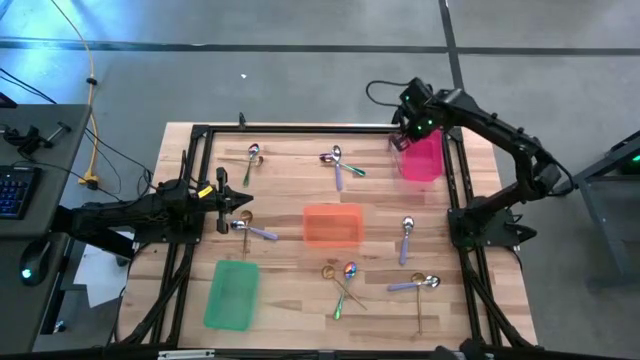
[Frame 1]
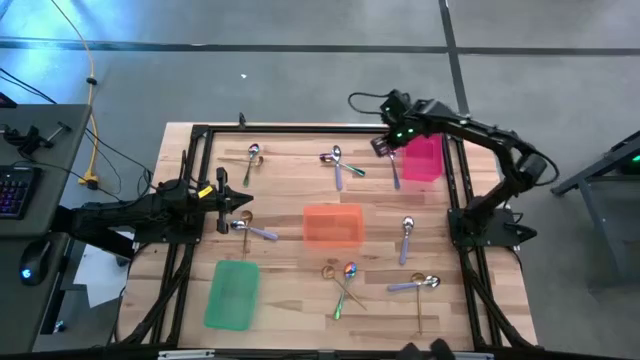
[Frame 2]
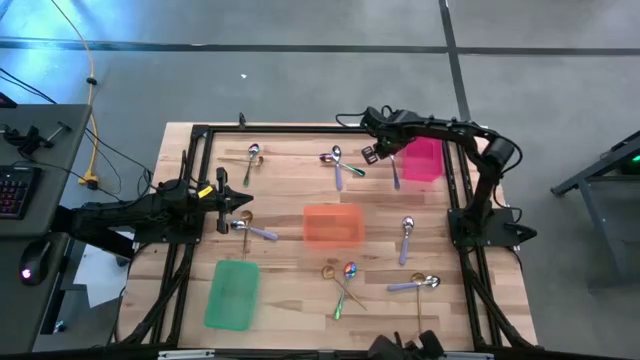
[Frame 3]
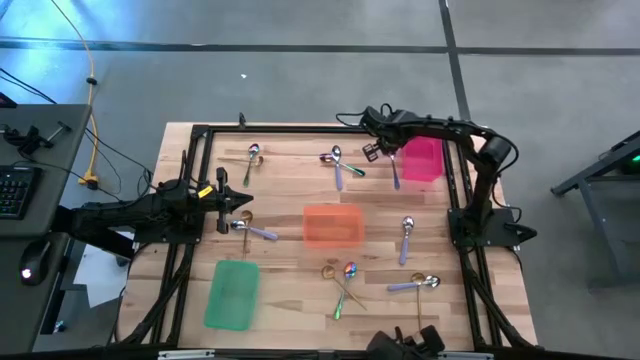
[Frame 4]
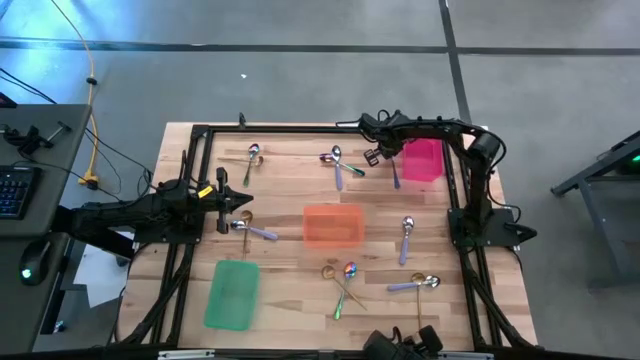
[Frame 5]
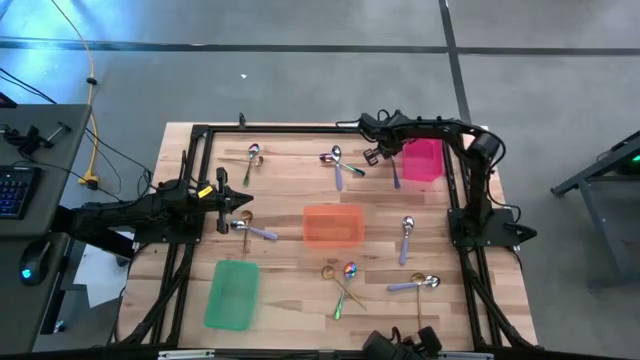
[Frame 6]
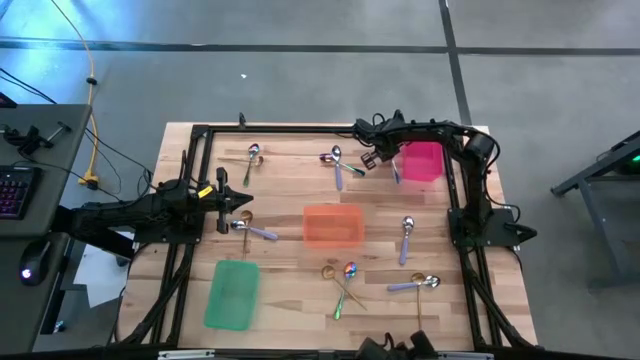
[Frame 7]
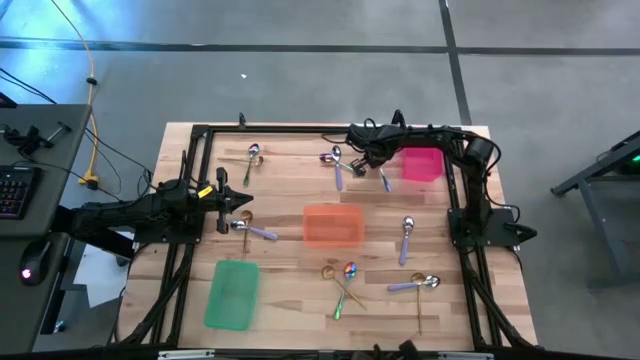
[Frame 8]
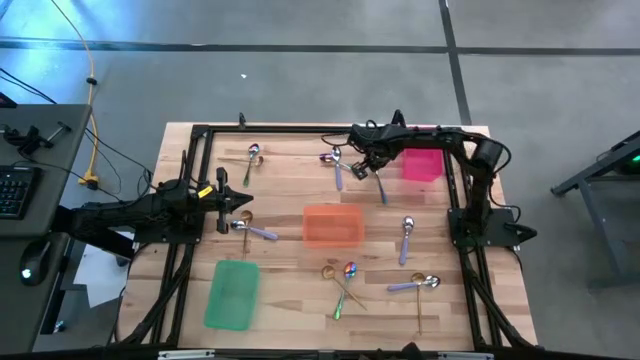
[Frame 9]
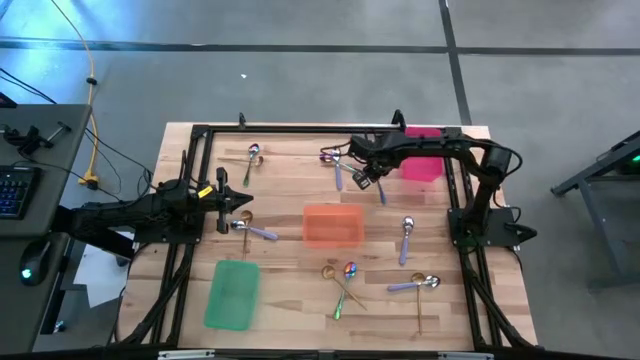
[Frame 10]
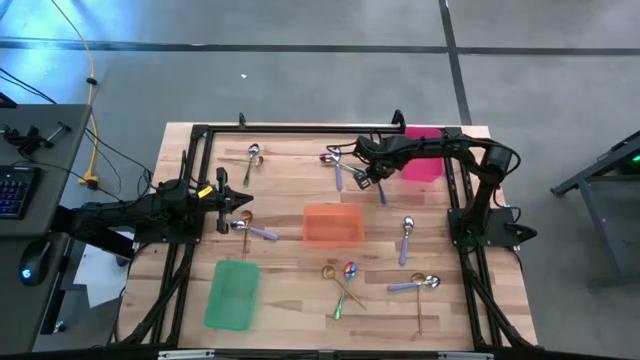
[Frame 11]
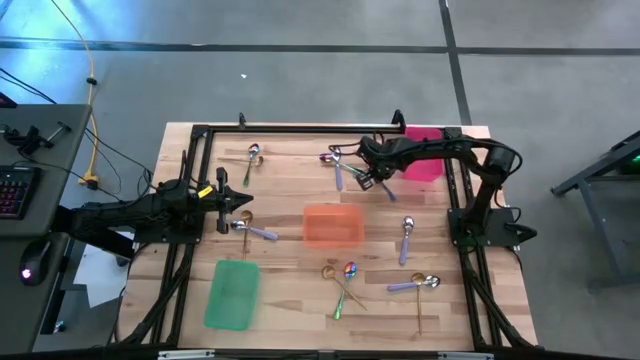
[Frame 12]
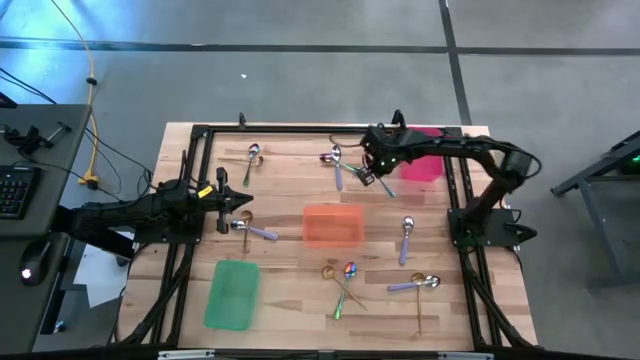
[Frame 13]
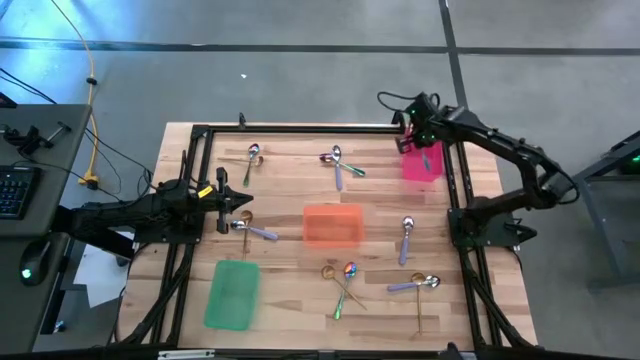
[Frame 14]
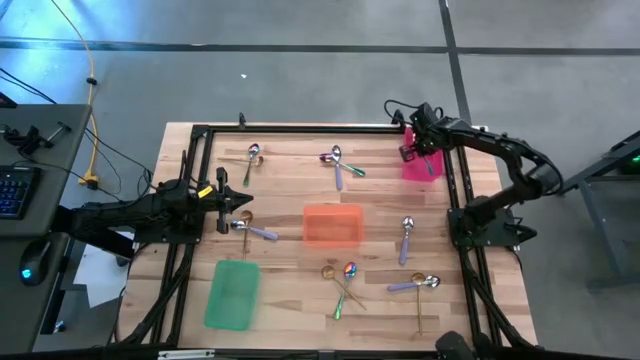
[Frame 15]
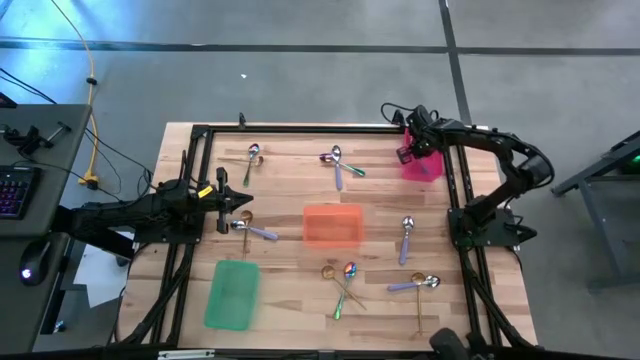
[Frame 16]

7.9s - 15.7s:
Task: Sort silverware by color (type)
Put the right multicolored spoon into the red bin

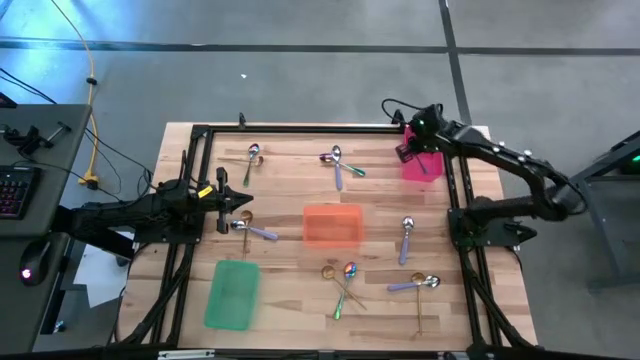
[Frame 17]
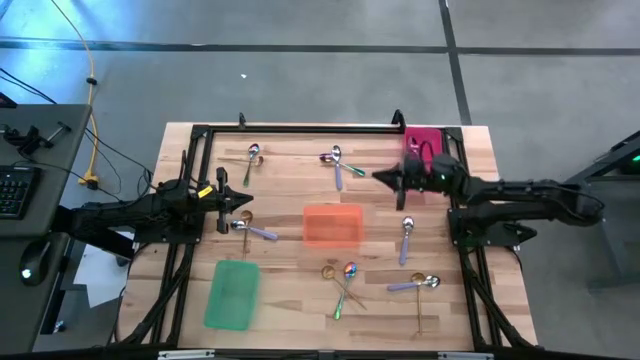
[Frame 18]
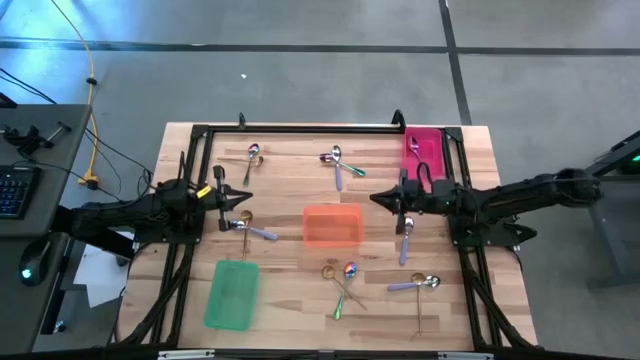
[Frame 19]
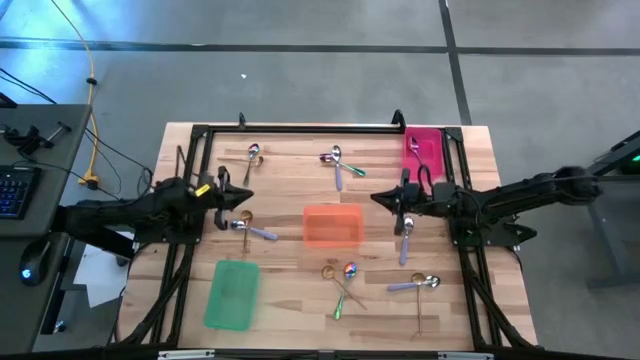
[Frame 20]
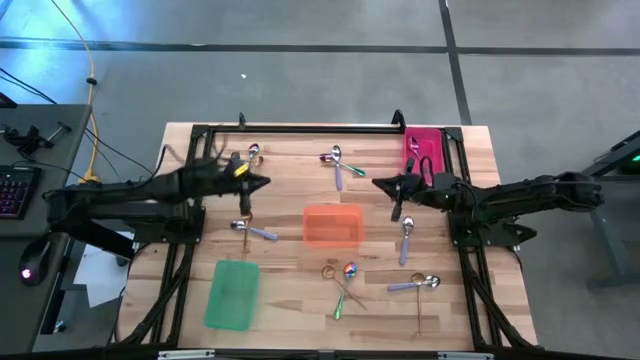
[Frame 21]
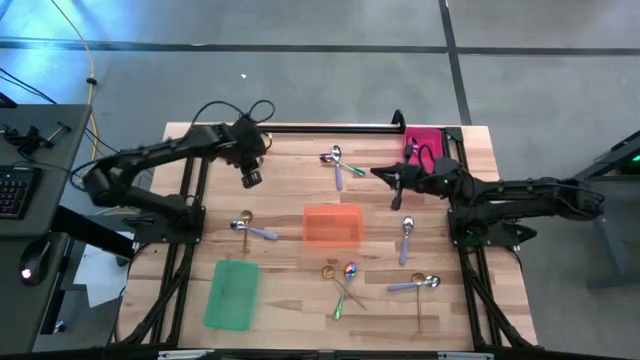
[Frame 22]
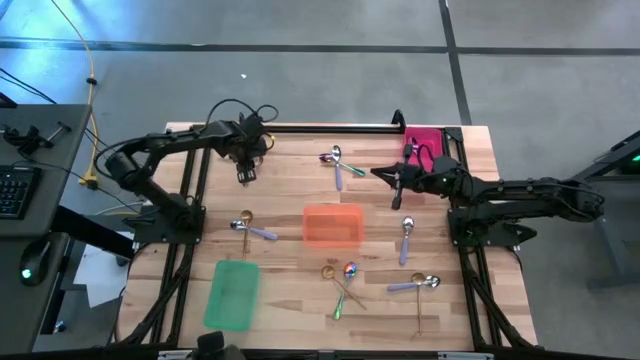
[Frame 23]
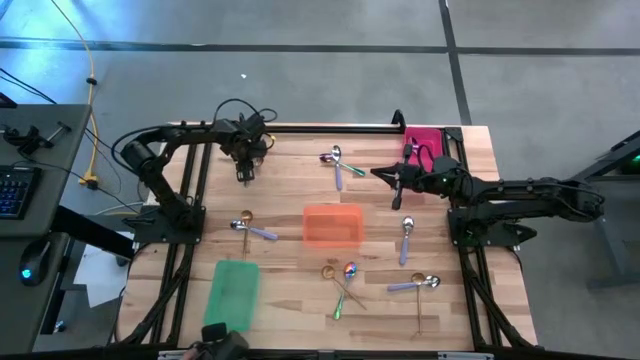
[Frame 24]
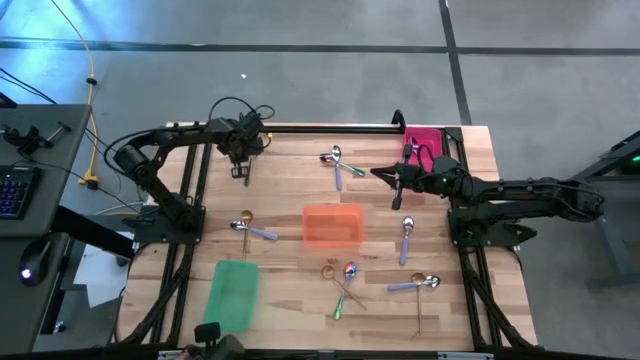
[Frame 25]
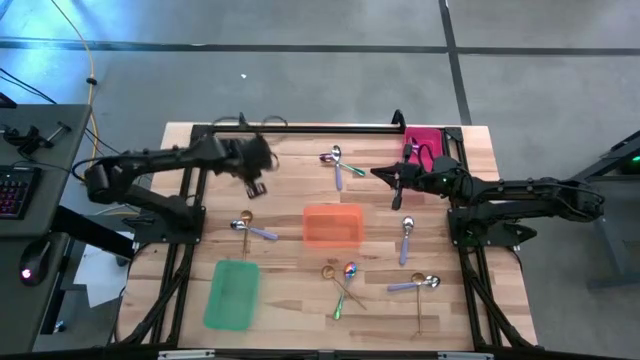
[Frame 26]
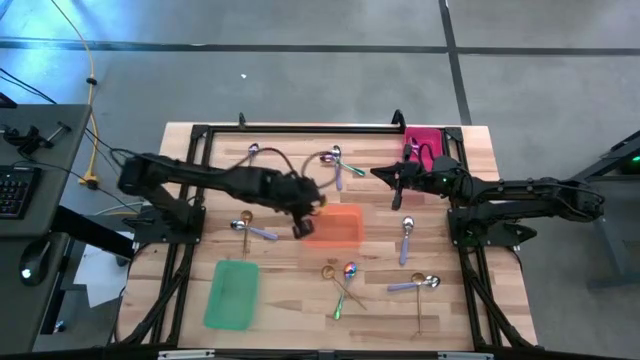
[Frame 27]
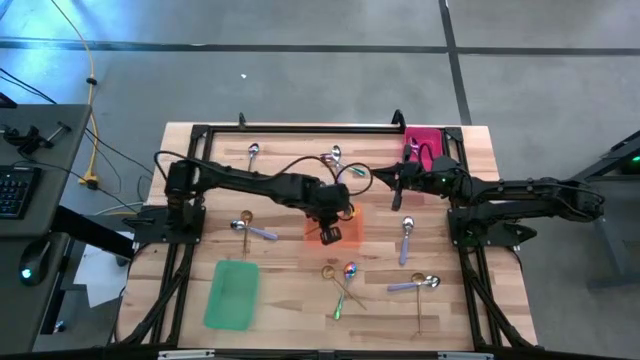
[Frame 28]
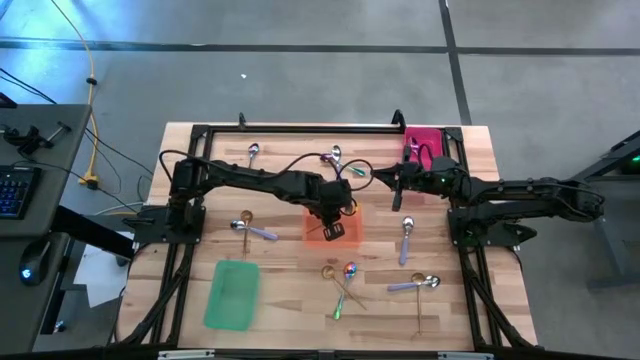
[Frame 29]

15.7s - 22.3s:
Put the top gold spoon into the orange bin

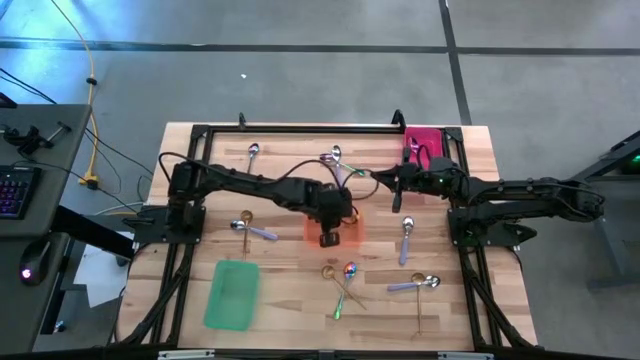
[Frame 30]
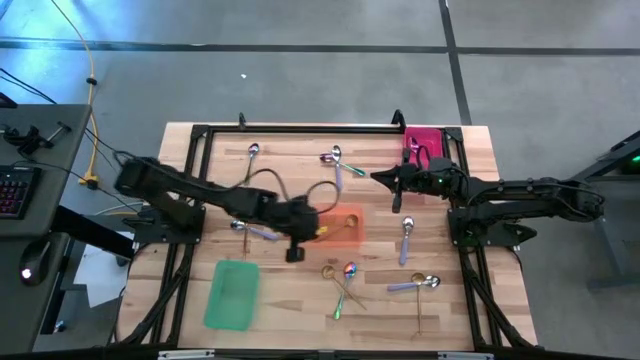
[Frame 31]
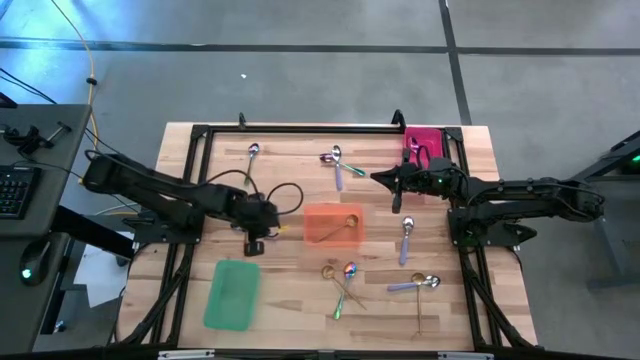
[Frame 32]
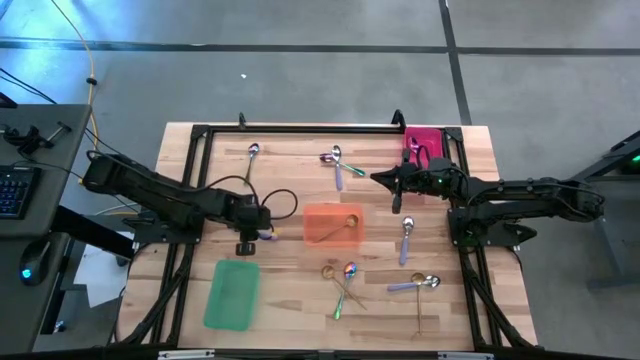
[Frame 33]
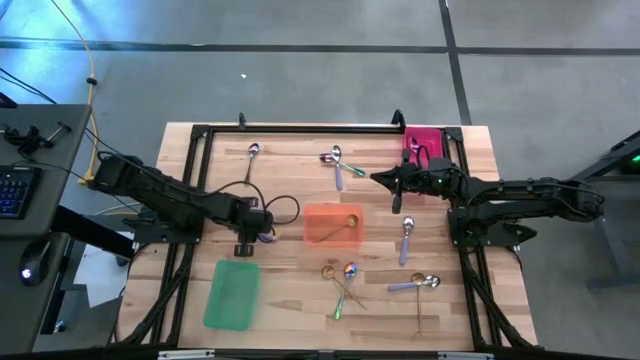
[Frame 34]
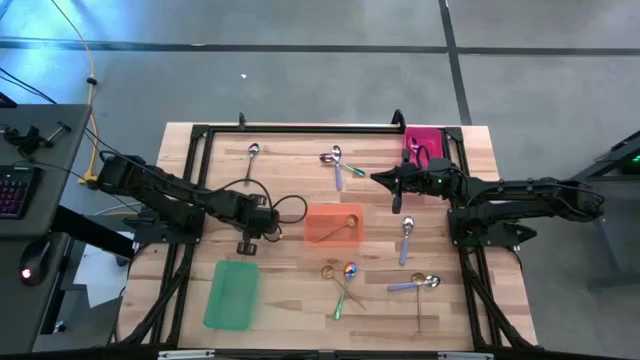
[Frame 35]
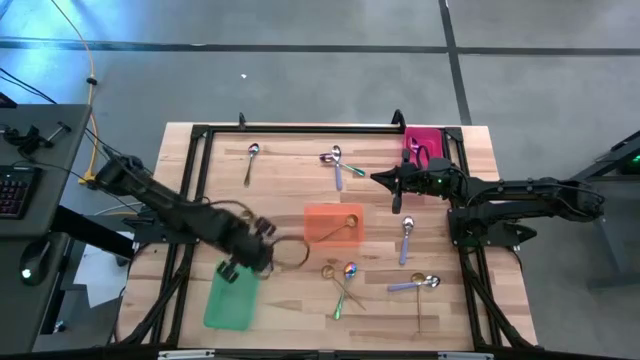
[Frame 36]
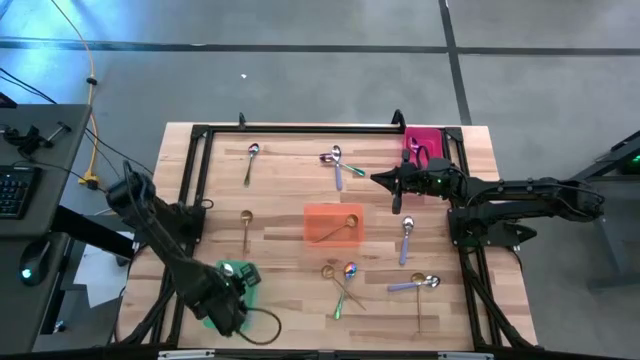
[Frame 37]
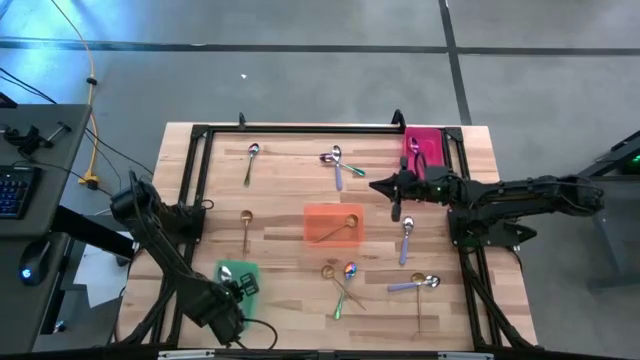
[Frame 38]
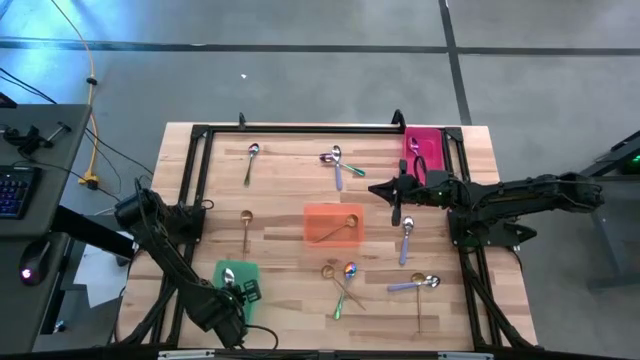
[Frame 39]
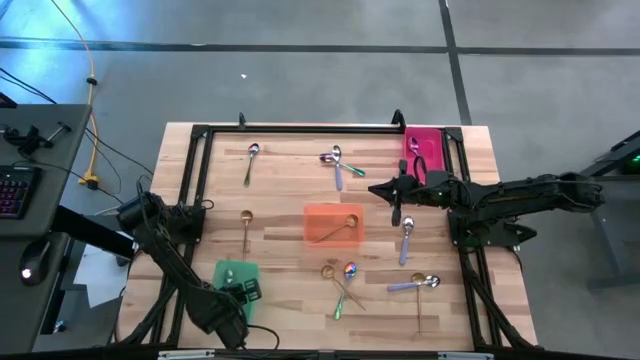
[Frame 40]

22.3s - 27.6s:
Put the left violet spoon into the green bin

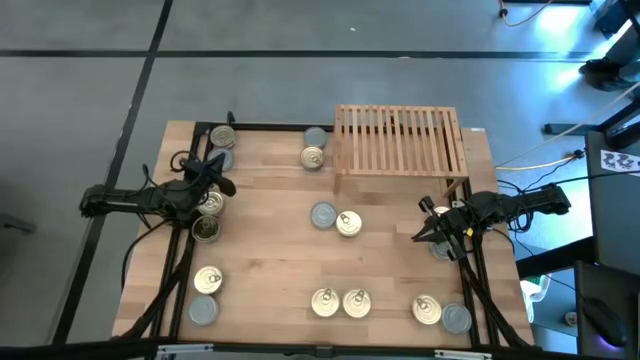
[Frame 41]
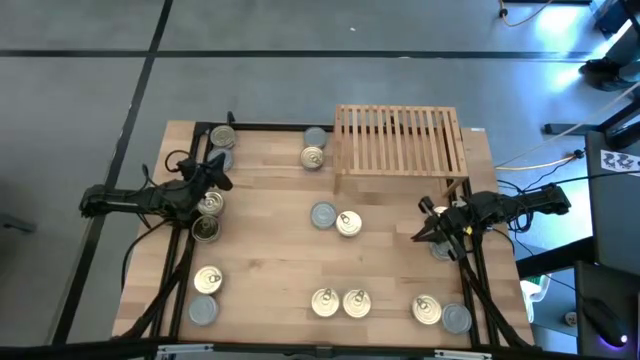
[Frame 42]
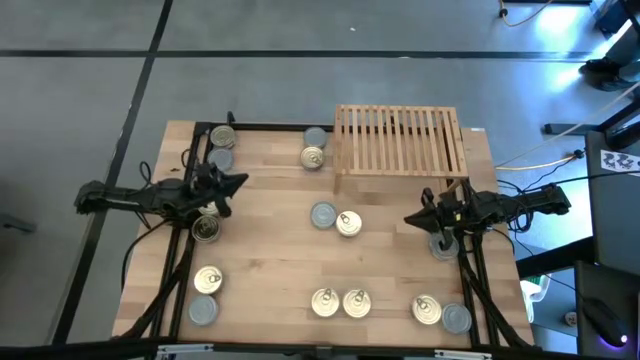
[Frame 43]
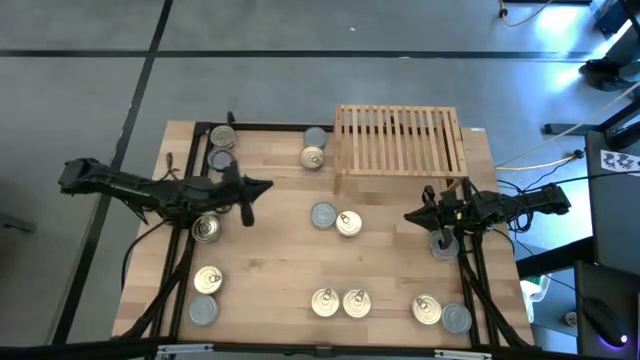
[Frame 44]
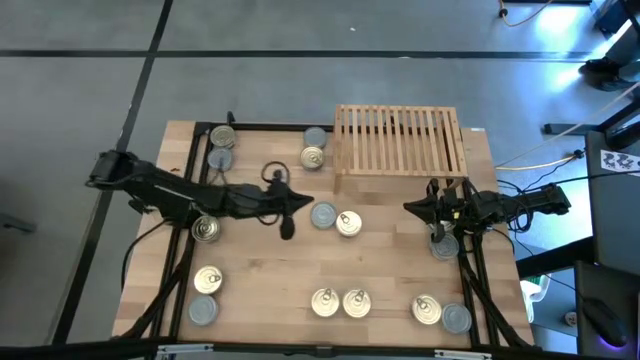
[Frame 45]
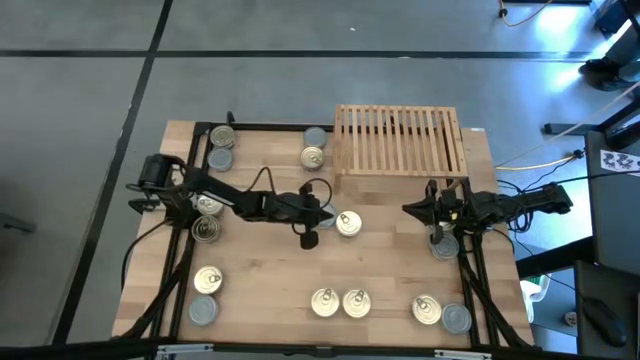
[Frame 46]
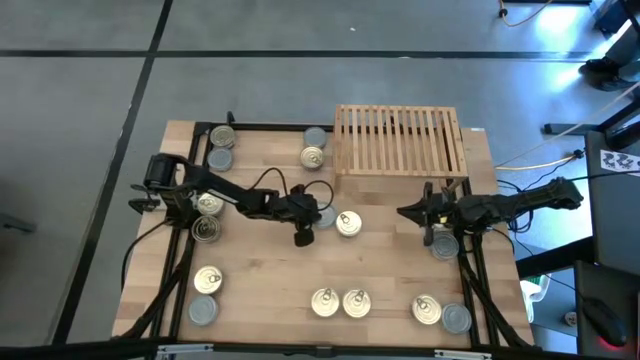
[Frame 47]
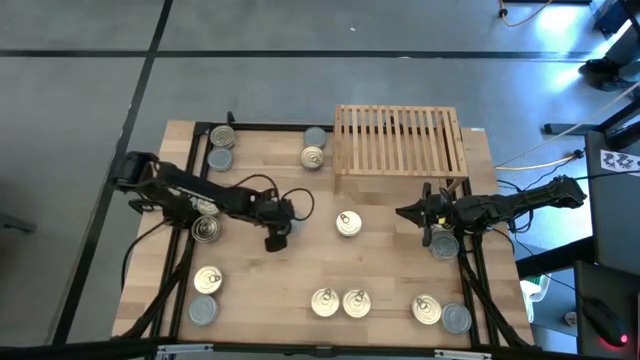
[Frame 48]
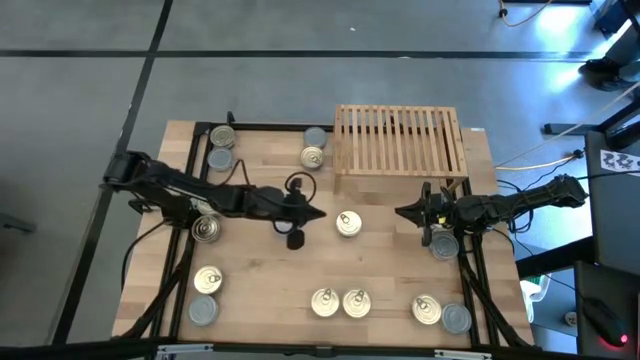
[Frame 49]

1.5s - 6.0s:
Task: Stack canned seafood by type on shelf
Move the green tuna can to the middle left of the table
